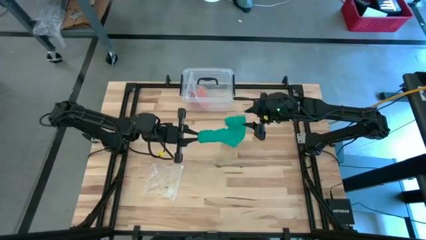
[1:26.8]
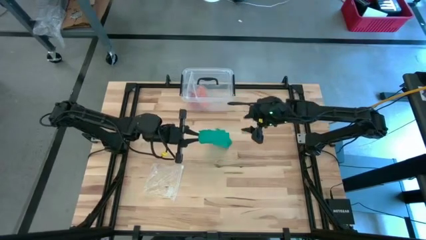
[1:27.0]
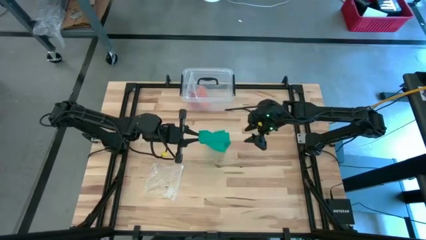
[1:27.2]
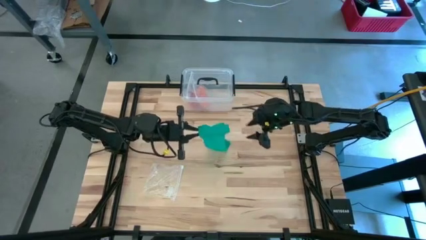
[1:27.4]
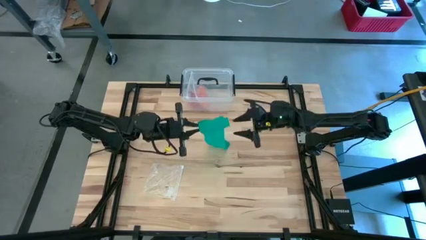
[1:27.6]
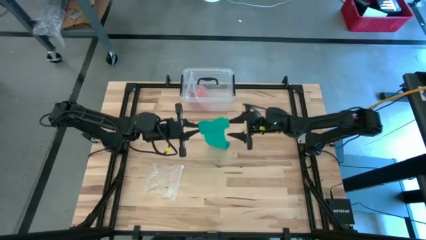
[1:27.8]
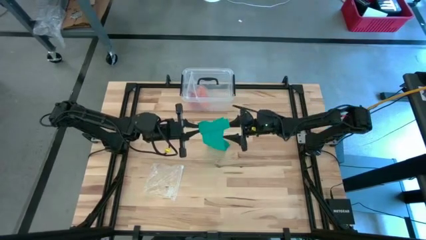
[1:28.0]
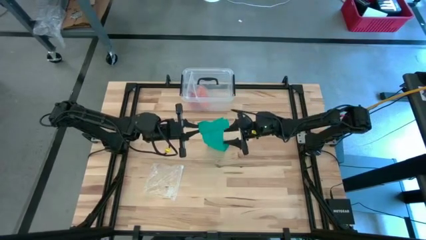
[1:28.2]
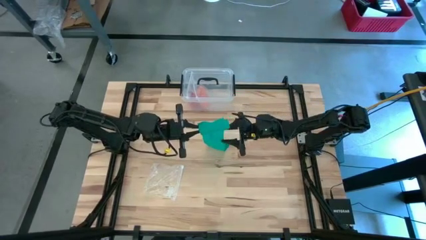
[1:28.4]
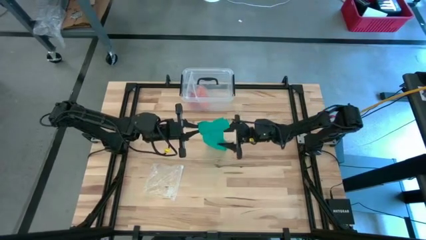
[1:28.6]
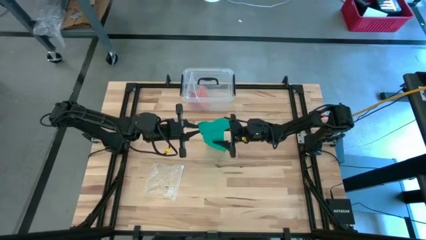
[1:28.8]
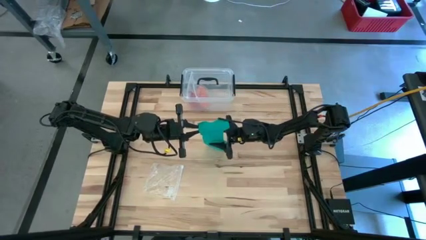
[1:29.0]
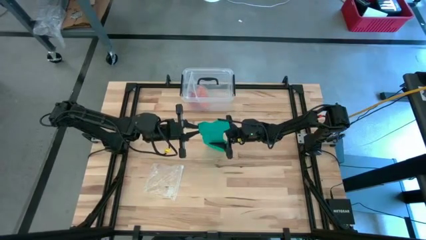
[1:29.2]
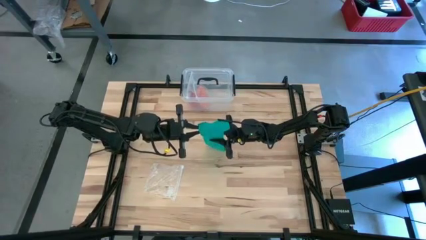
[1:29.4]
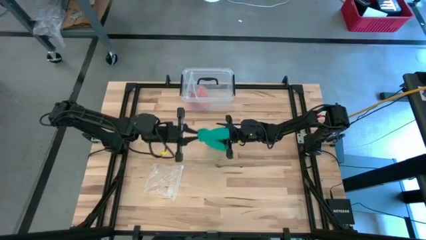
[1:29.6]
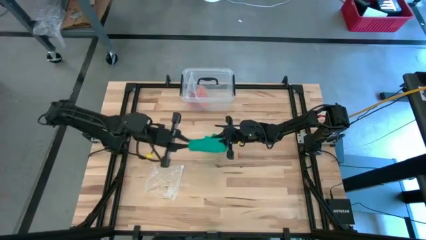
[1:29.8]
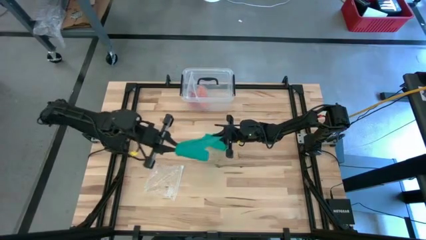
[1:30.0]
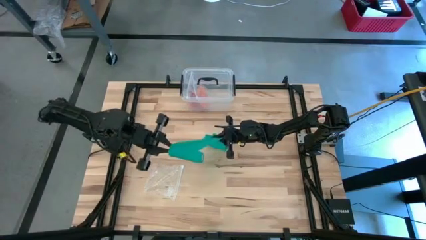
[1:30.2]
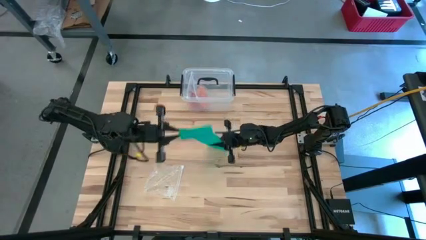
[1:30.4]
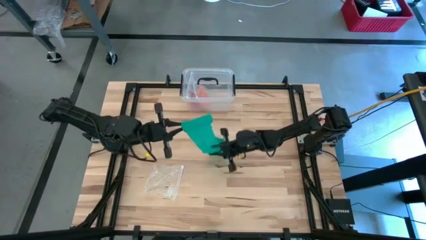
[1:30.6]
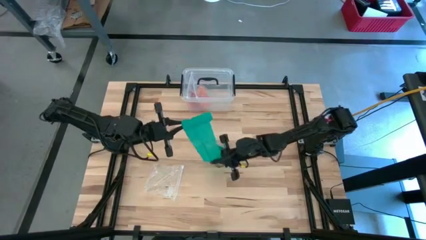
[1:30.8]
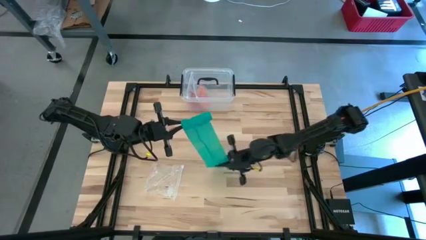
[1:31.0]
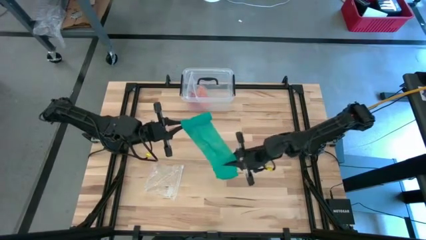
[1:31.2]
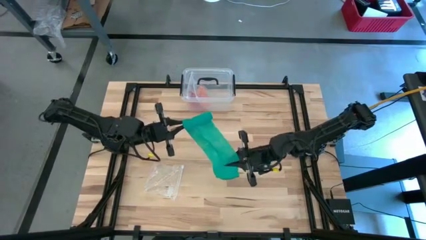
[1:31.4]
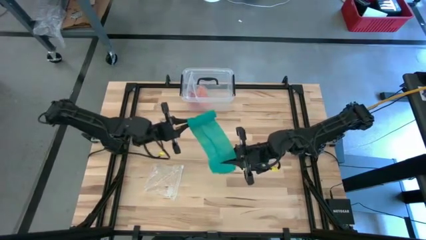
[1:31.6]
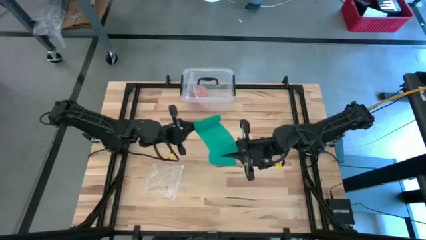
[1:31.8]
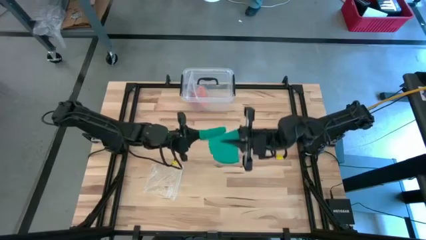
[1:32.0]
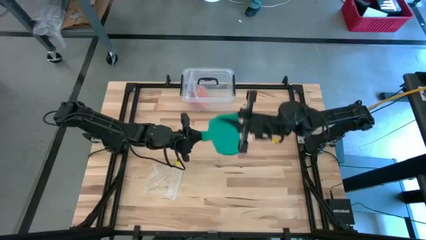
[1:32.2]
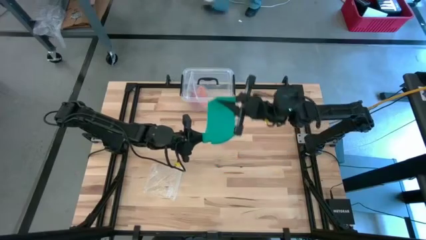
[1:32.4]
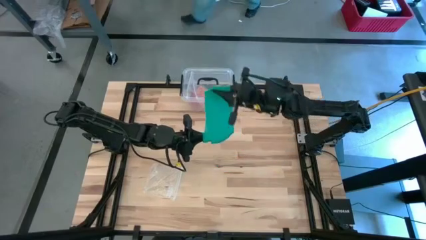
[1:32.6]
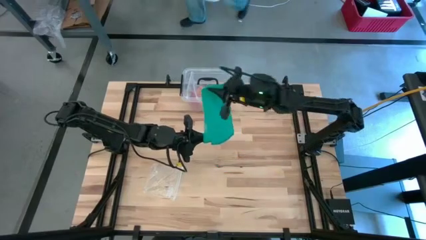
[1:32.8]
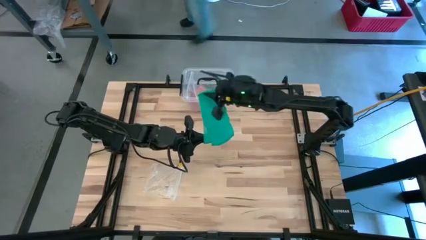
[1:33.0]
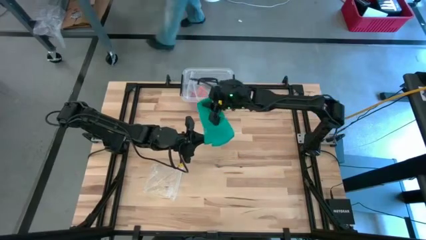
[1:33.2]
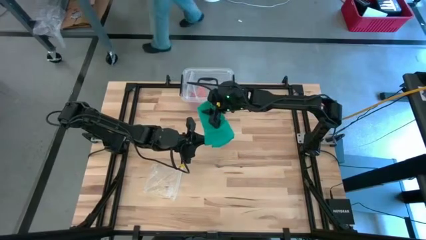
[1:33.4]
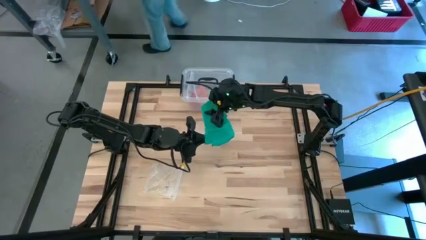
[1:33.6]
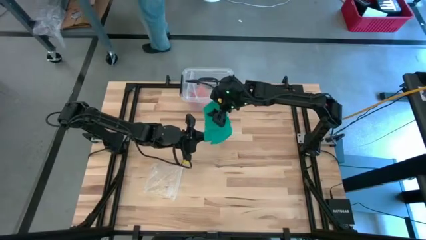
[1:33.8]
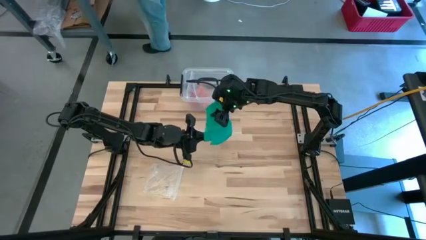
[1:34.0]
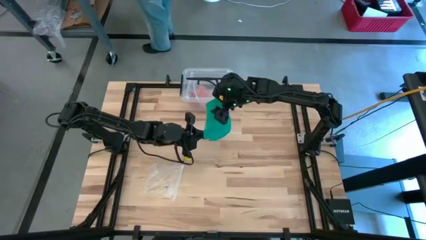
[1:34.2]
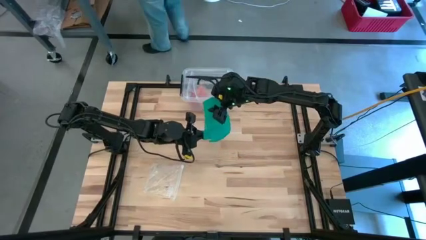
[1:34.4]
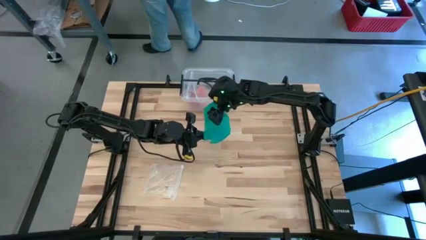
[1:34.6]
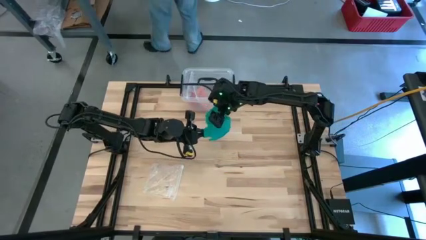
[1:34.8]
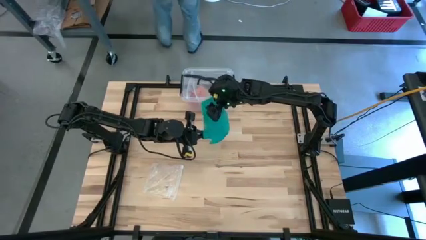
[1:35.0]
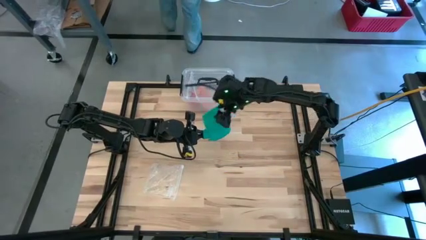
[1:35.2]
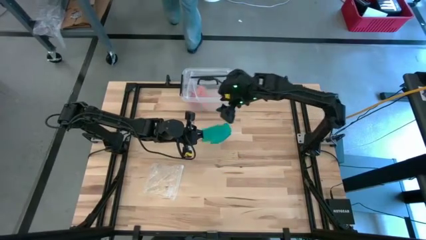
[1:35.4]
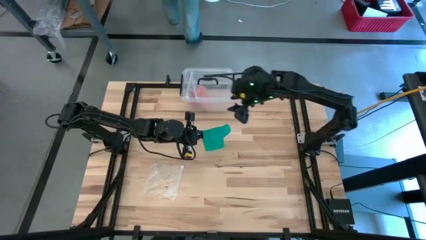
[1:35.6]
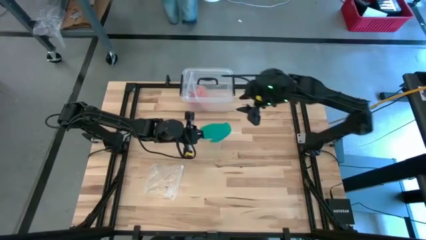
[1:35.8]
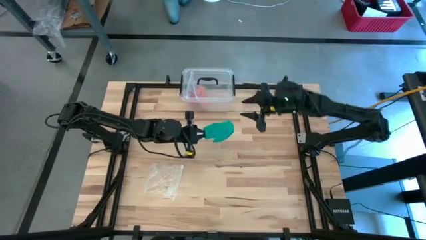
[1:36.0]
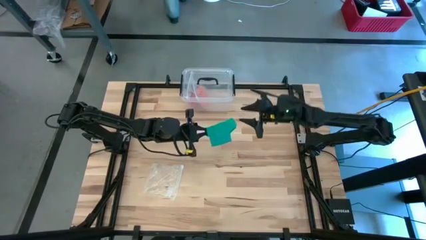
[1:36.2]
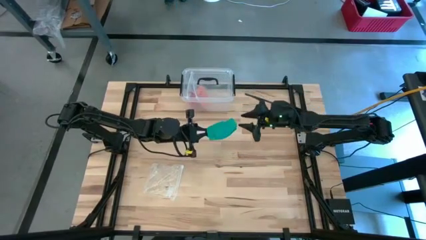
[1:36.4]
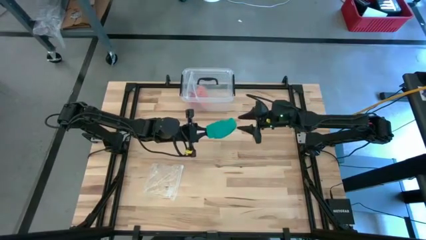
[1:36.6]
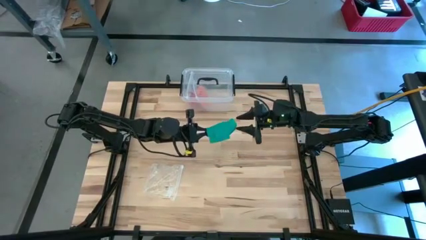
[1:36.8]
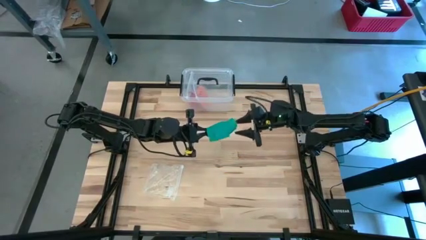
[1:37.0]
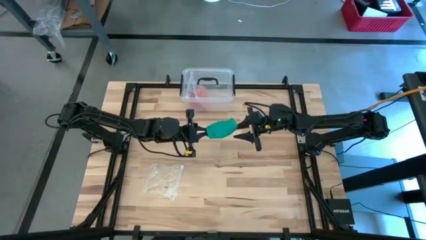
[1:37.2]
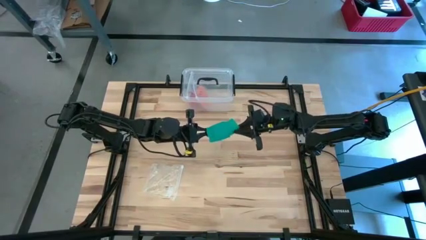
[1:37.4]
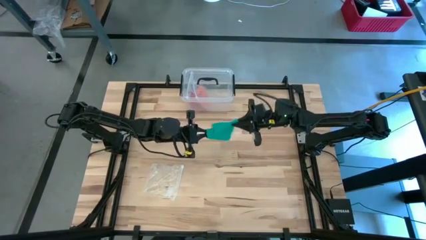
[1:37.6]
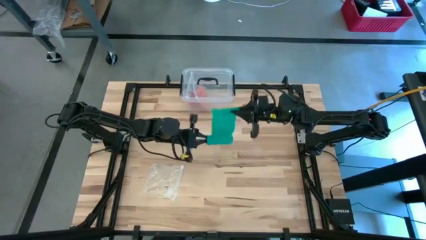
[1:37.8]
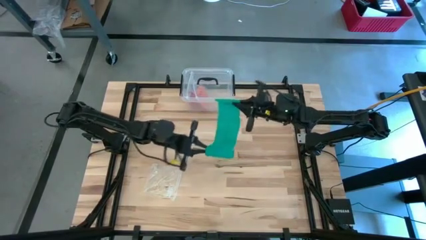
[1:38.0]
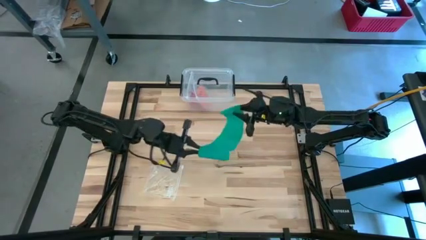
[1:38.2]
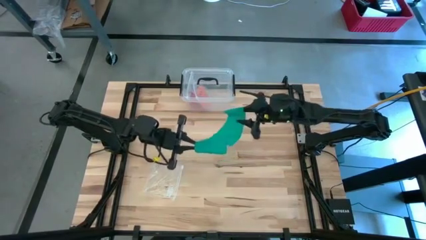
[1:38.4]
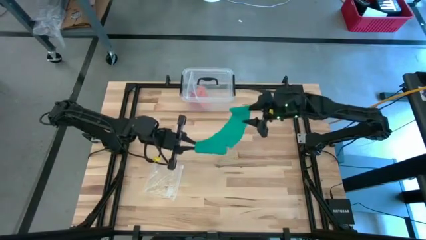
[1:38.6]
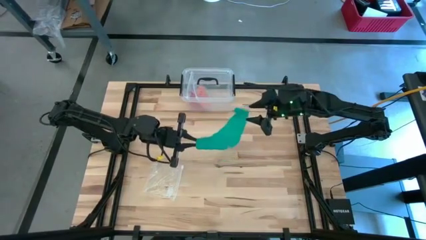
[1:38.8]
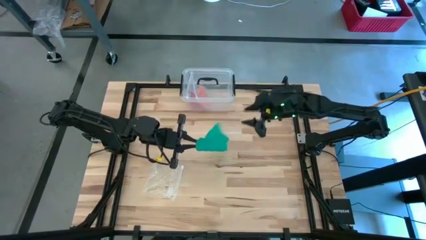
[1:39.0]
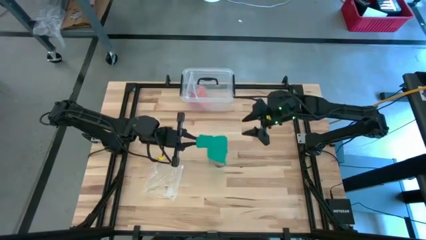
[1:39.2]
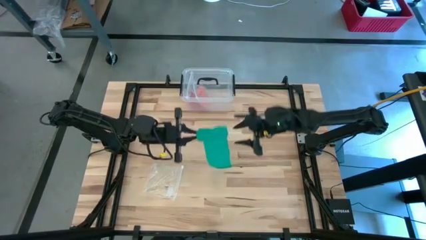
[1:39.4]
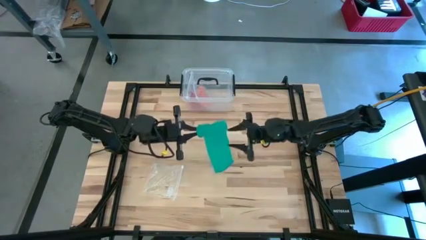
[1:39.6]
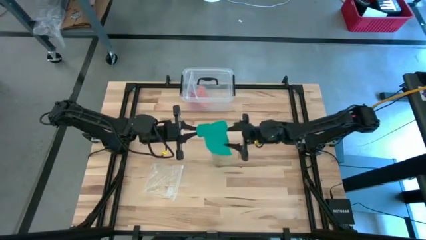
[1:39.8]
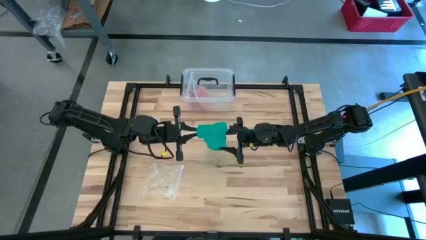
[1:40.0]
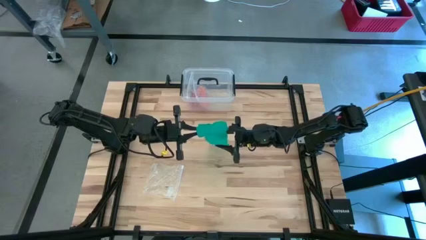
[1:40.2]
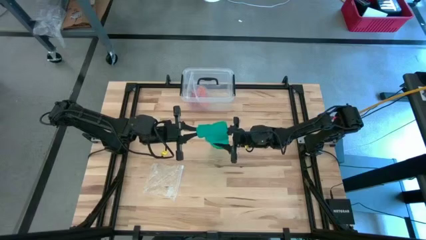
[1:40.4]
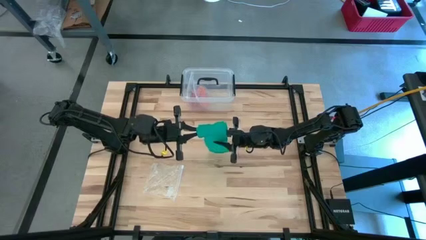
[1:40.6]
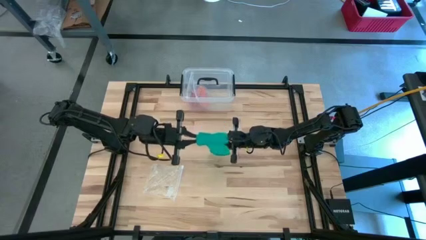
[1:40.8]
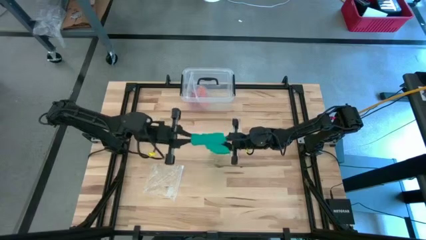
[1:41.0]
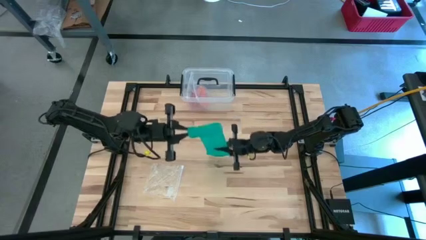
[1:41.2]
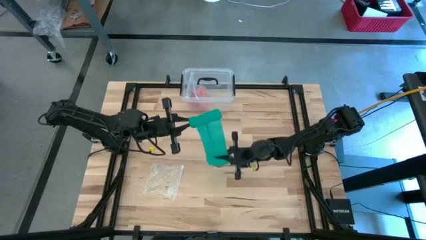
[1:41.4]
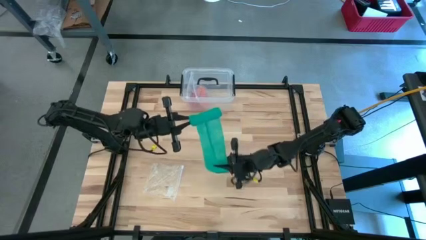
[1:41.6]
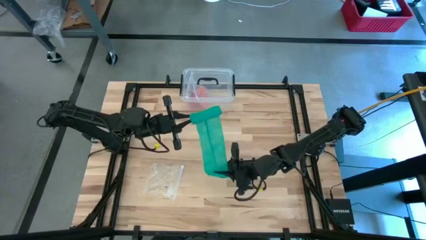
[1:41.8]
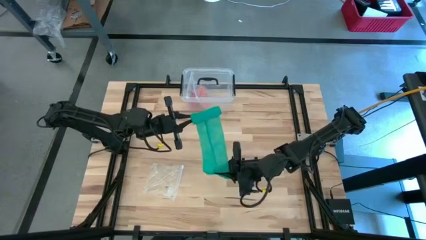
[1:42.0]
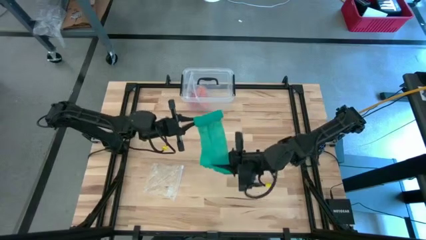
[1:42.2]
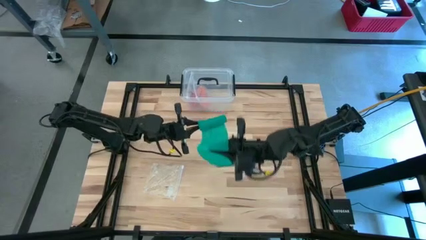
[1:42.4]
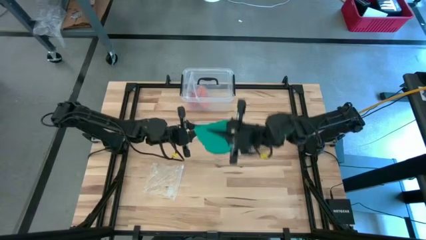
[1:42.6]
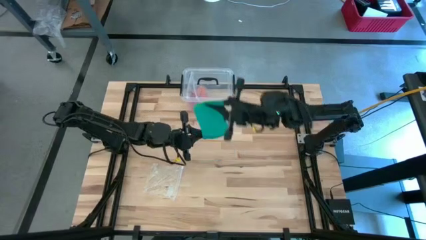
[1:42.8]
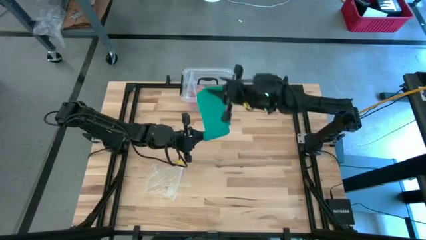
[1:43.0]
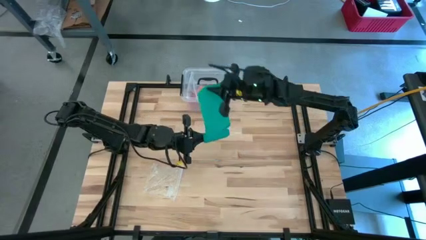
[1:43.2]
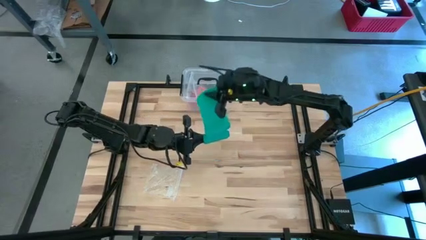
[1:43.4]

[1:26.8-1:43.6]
Task: Roll bandage
Roll the green bandage
